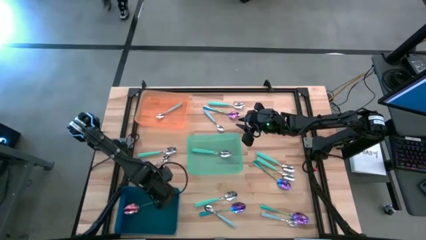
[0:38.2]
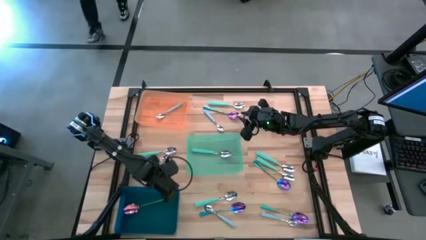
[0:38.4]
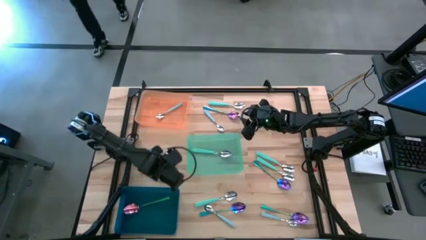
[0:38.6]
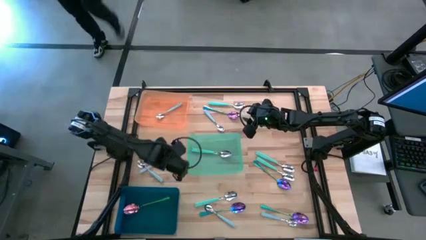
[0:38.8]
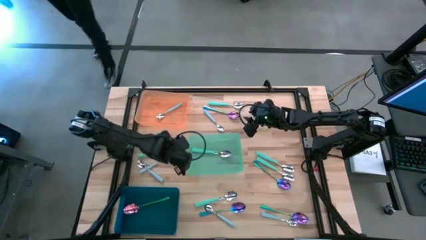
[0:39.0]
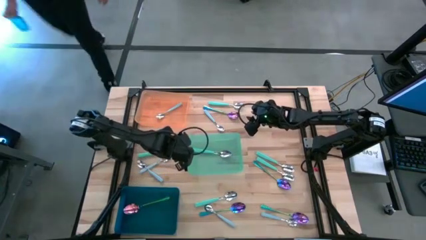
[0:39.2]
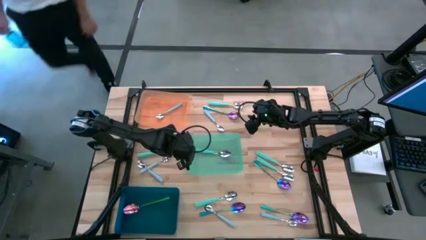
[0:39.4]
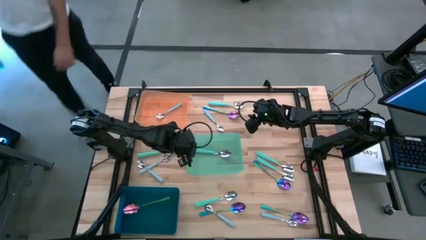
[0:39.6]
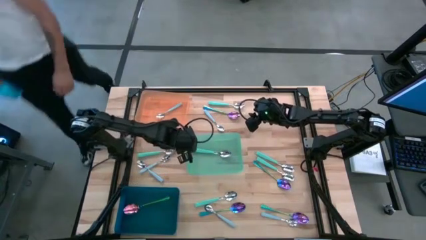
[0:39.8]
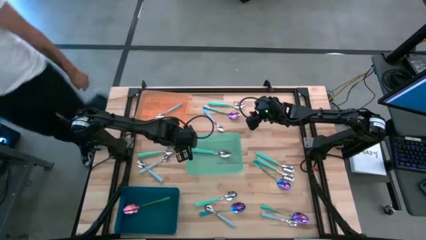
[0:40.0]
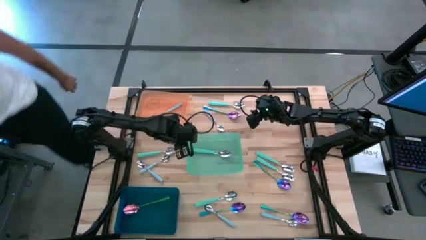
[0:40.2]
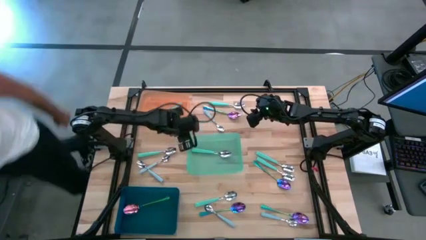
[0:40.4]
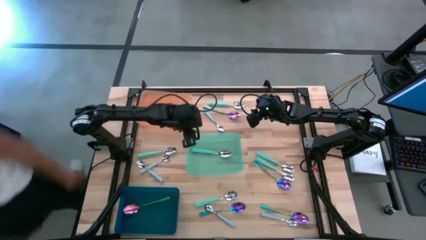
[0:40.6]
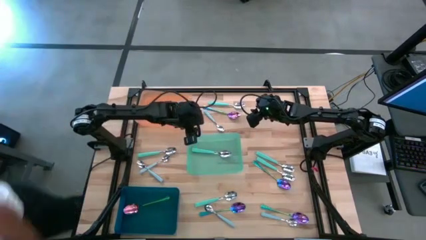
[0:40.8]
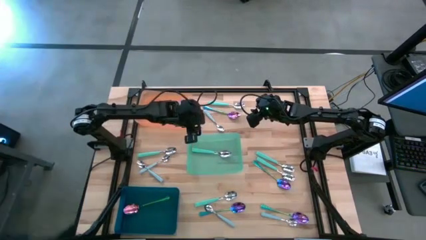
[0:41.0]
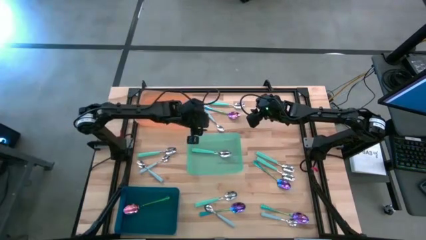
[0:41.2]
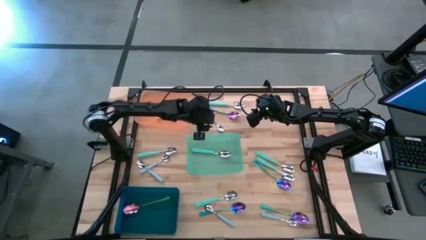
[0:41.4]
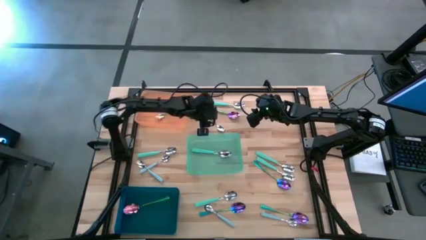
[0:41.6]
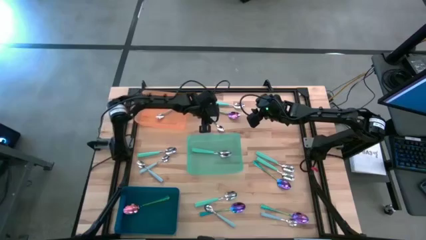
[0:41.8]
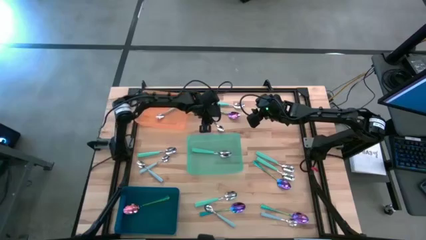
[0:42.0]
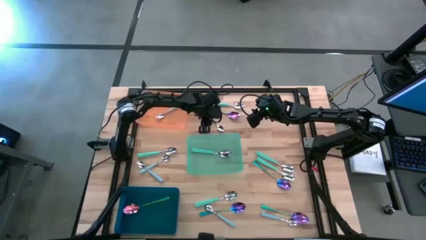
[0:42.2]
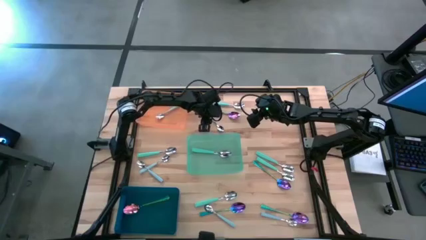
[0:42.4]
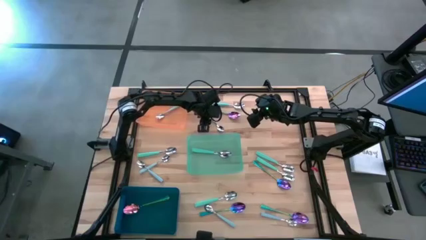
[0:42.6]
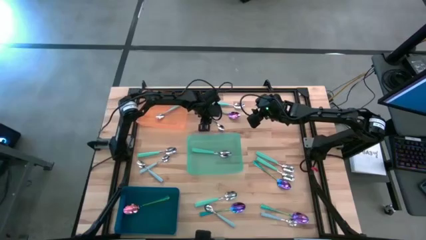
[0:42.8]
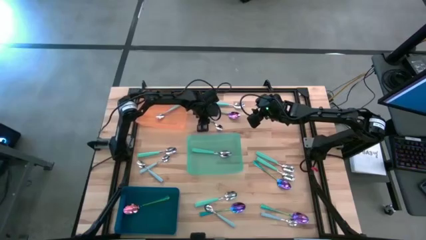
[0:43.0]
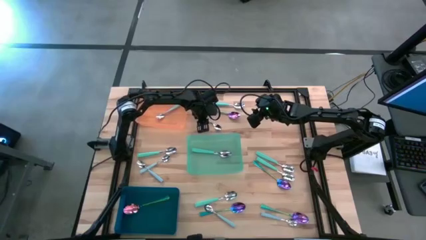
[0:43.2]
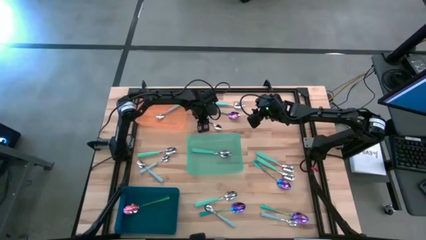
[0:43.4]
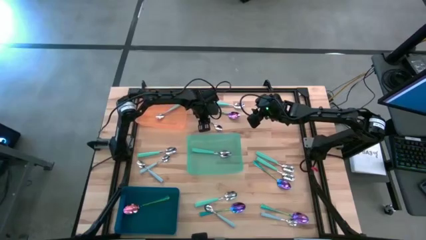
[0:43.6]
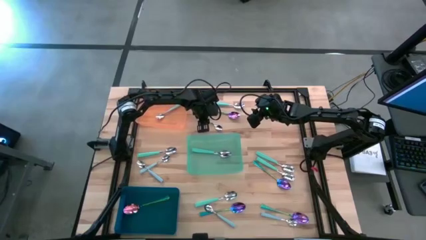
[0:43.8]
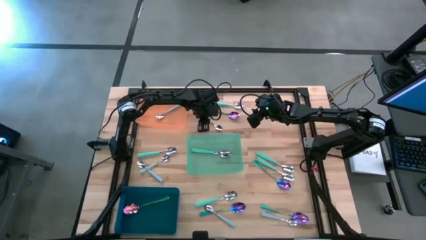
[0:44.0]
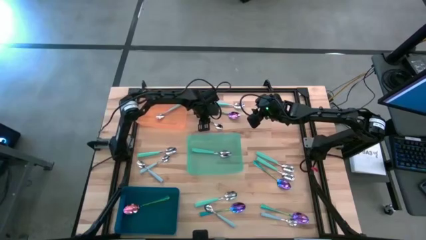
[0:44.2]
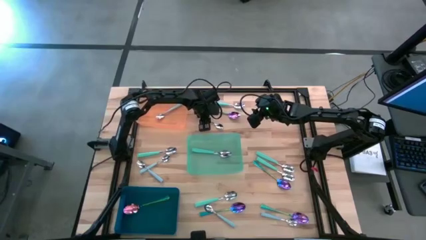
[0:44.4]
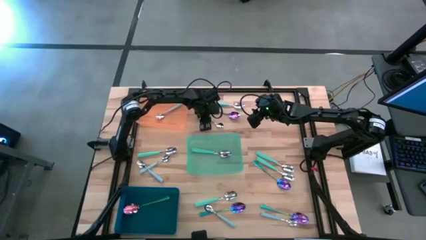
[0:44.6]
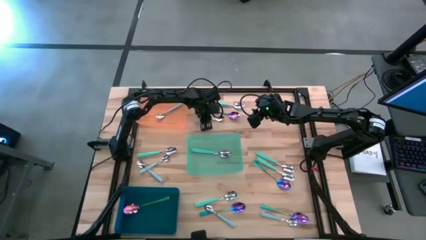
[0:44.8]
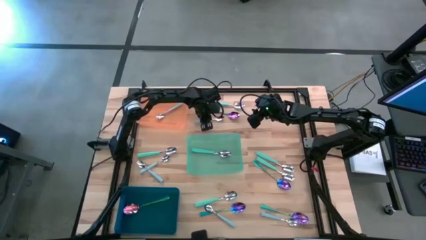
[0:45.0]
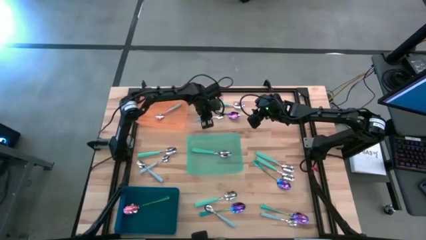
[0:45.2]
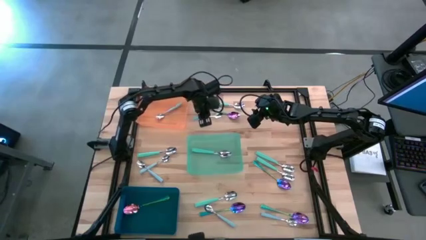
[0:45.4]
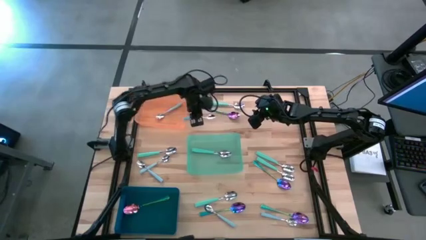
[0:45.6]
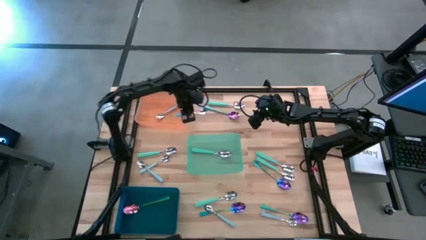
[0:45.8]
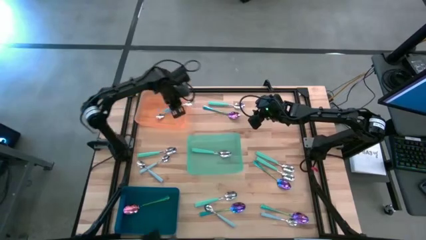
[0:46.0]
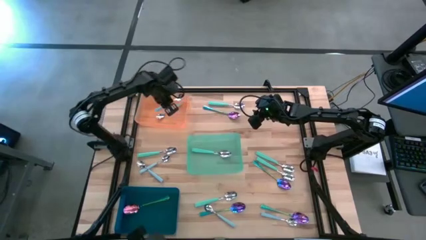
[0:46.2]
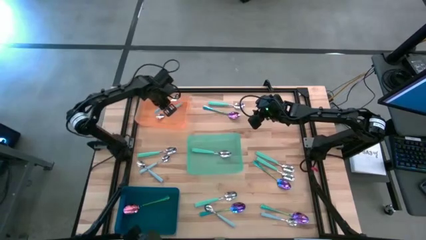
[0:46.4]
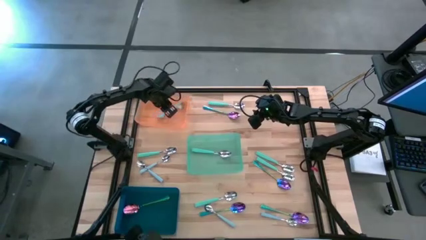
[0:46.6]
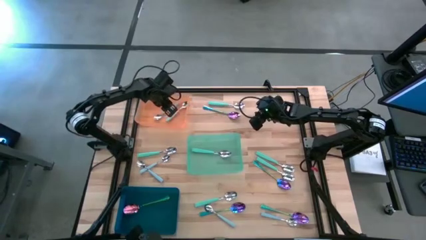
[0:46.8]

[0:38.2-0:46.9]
Task: Sort silverware by color (type)
Put the blue spoon into the orange bin

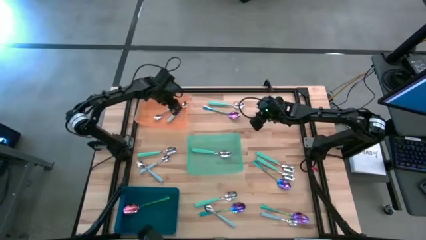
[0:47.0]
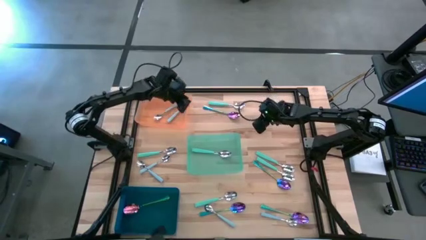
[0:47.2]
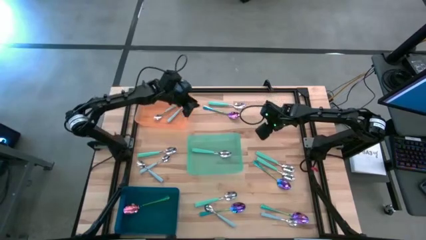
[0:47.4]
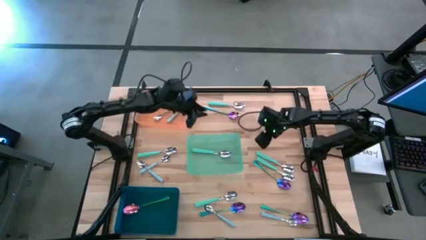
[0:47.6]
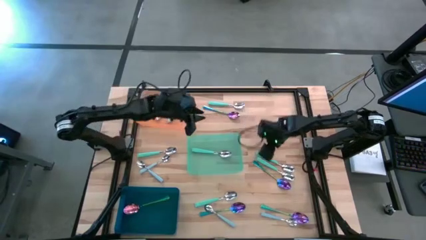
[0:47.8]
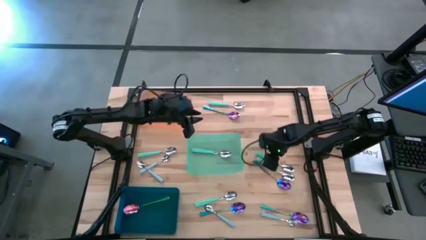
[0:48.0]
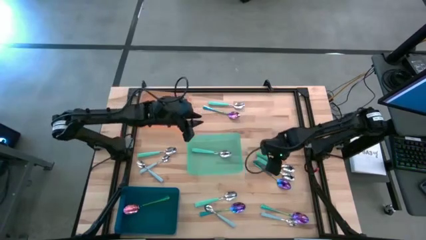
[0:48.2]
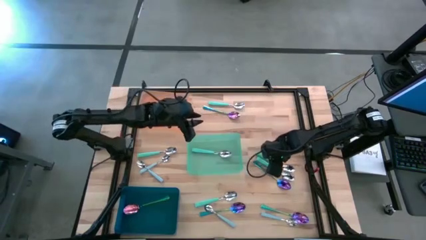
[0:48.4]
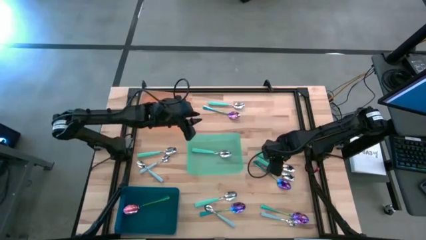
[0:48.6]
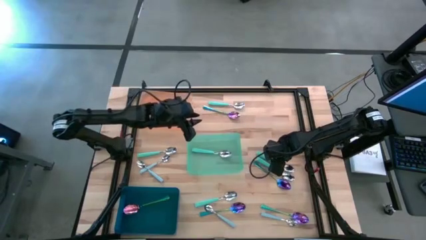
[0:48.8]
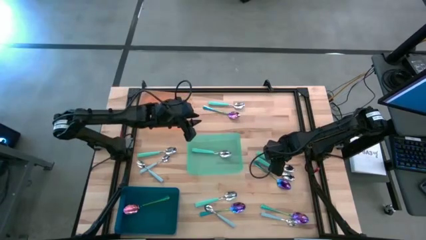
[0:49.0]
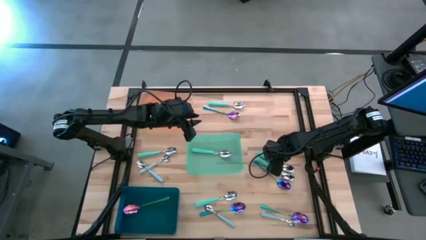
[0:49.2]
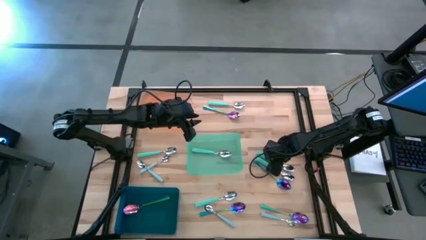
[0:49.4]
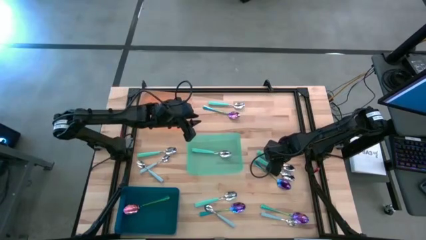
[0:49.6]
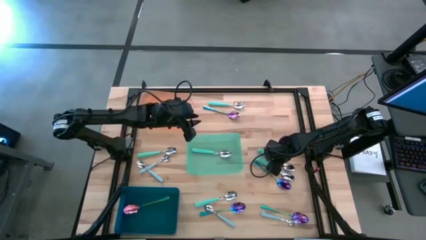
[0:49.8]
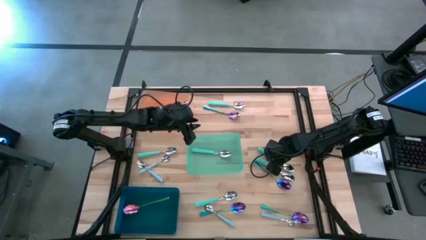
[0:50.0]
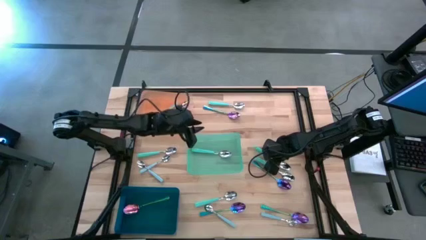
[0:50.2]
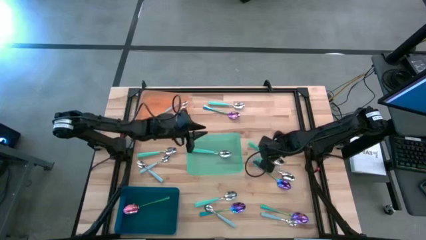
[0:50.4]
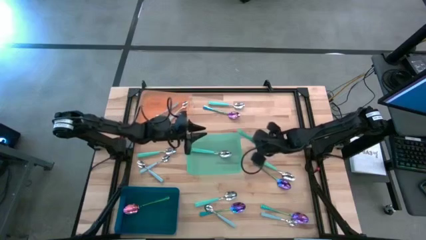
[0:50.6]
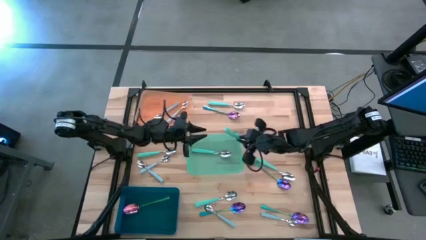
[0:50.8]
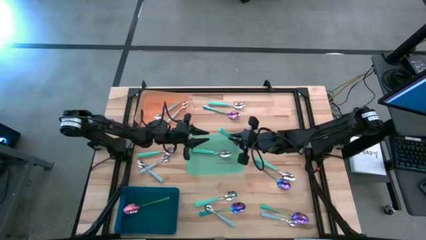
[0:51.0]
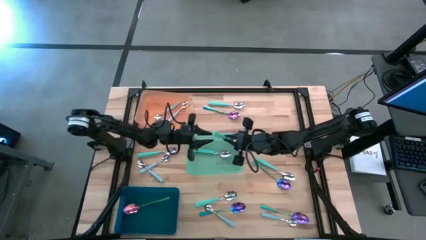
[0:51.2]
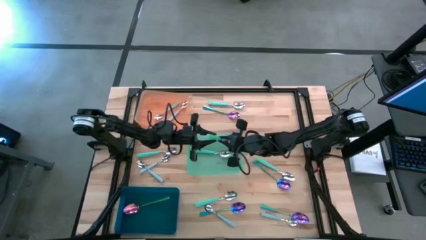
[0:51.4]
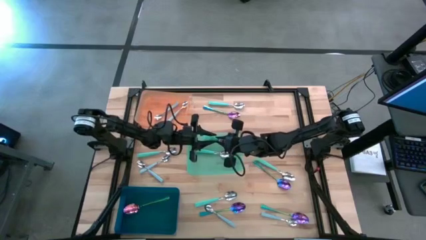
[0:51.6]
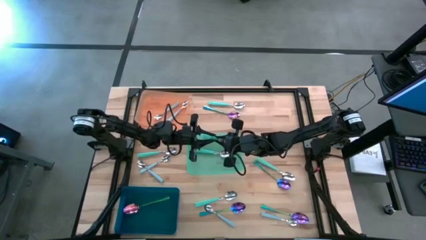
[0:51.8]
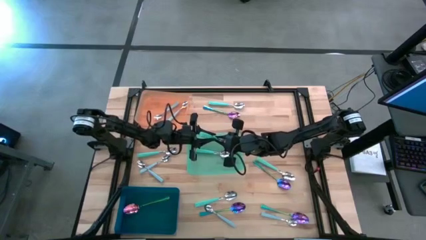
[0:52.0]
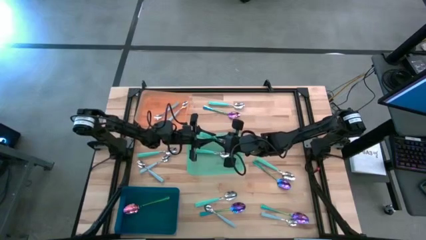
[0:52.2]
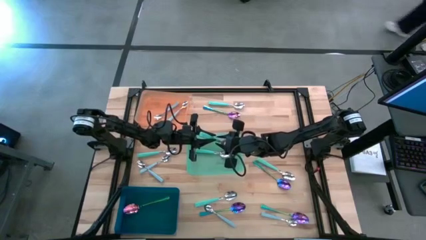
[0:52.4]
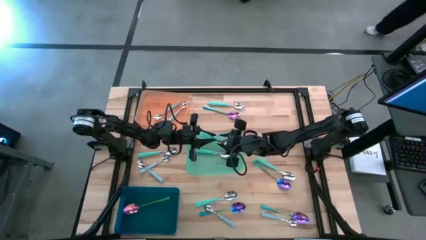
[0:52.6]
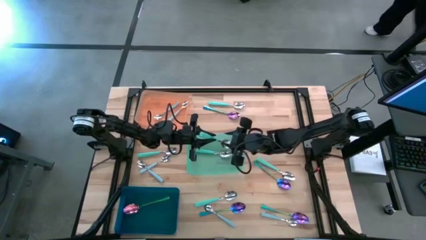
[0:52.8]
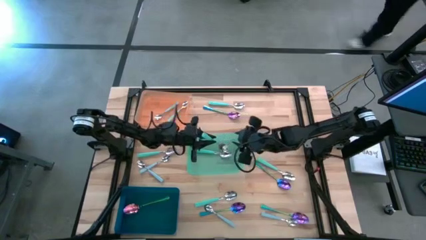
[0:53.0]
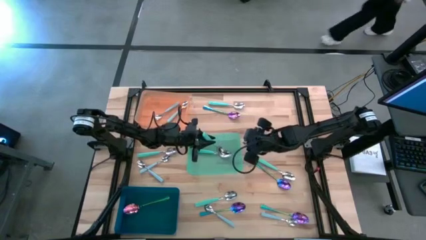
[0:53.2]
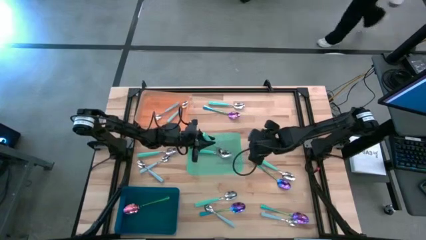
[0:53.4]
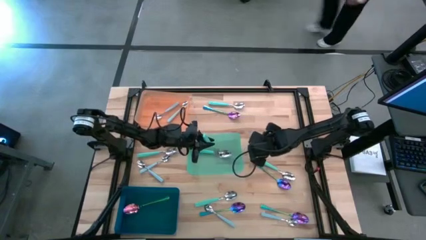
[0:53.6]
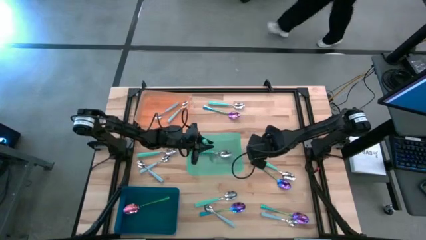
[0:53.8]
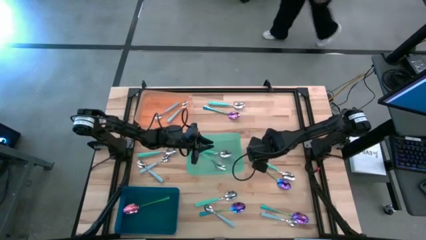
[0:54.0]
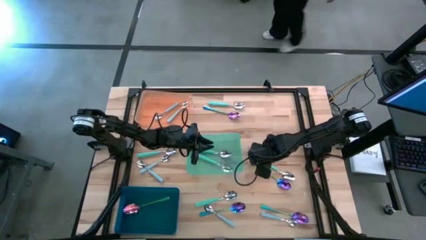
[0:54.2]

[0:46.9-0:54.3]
Put the green spoon into the green bin
